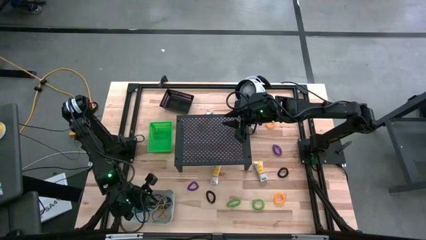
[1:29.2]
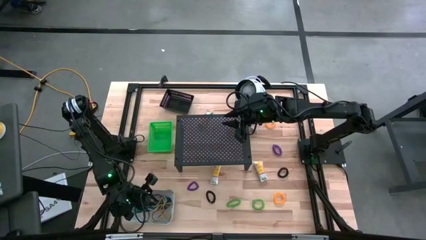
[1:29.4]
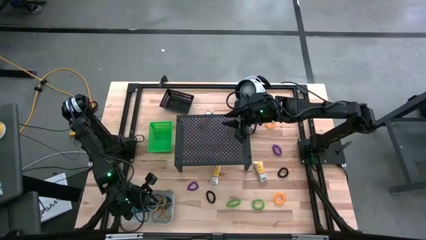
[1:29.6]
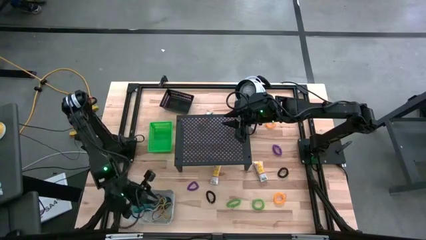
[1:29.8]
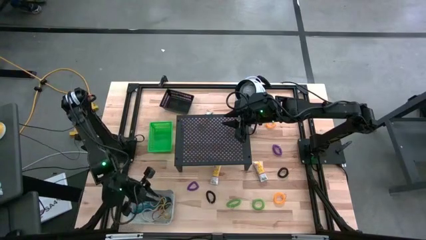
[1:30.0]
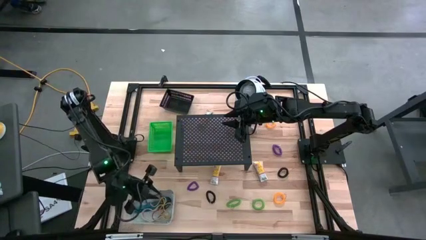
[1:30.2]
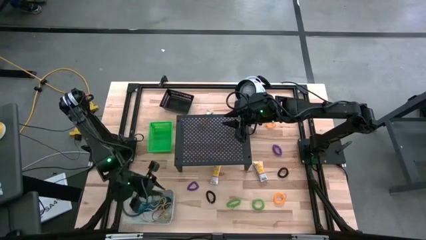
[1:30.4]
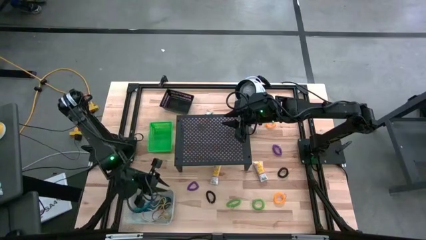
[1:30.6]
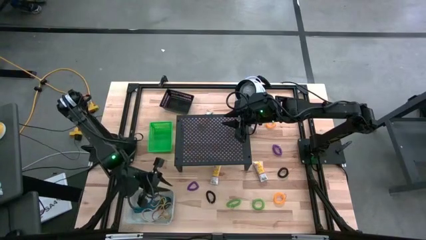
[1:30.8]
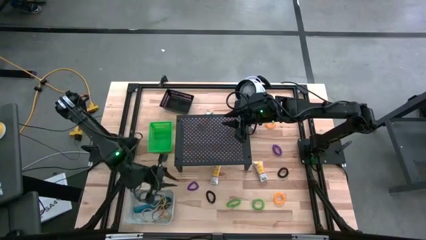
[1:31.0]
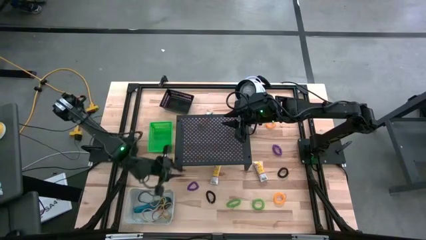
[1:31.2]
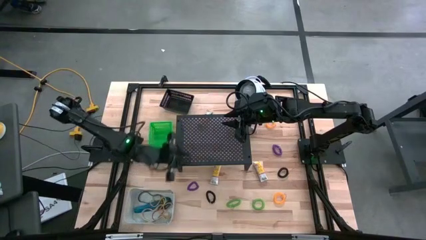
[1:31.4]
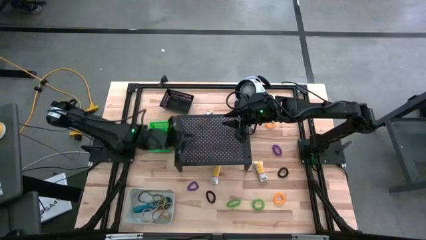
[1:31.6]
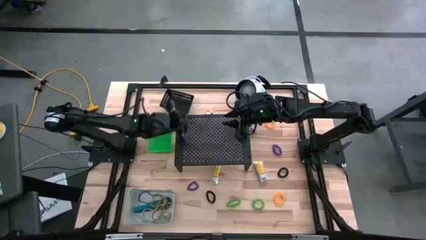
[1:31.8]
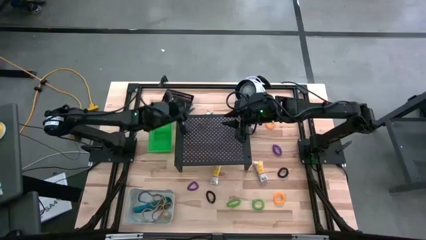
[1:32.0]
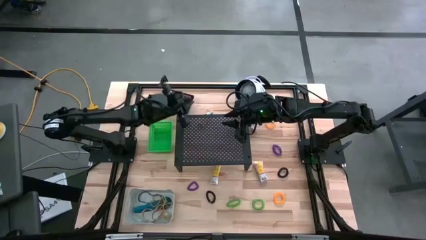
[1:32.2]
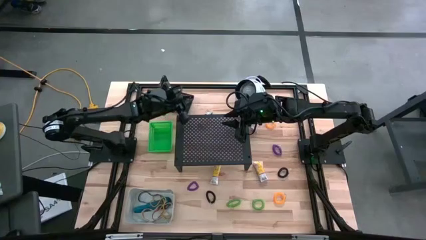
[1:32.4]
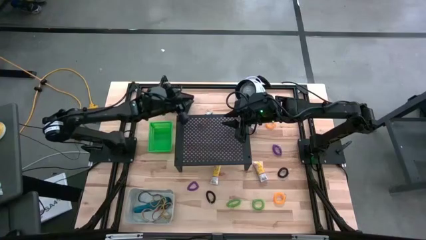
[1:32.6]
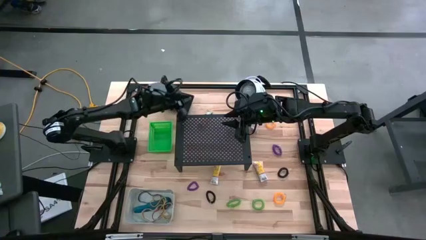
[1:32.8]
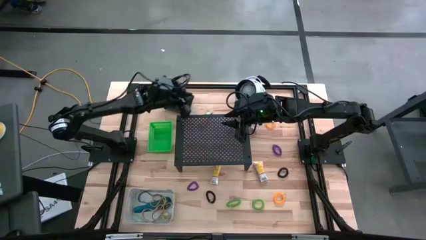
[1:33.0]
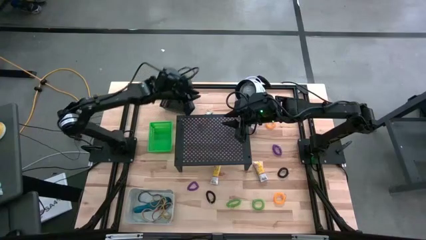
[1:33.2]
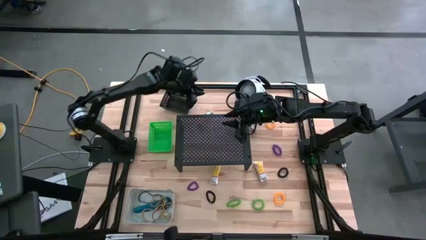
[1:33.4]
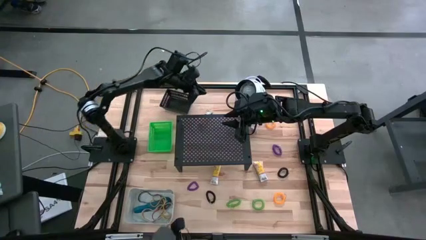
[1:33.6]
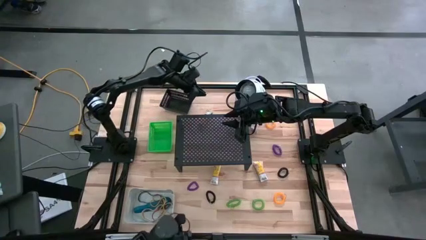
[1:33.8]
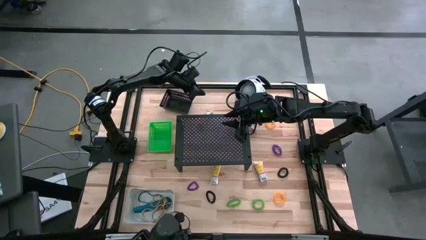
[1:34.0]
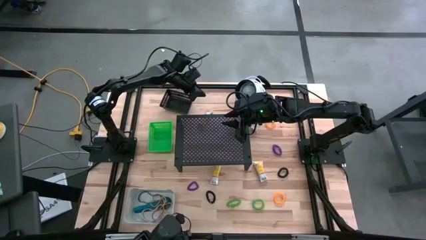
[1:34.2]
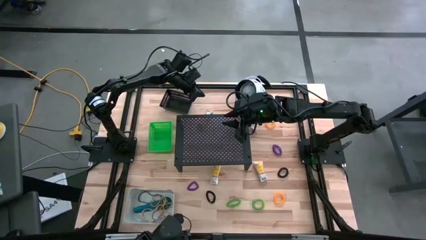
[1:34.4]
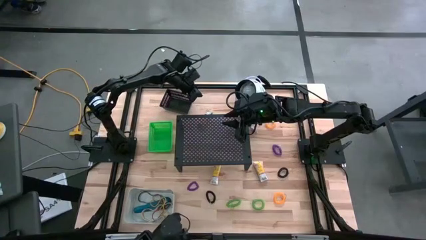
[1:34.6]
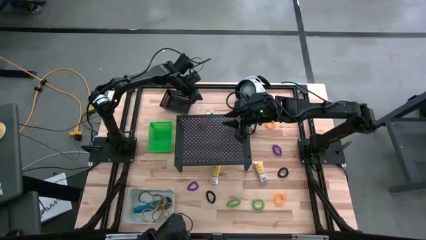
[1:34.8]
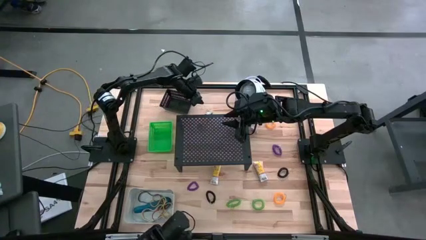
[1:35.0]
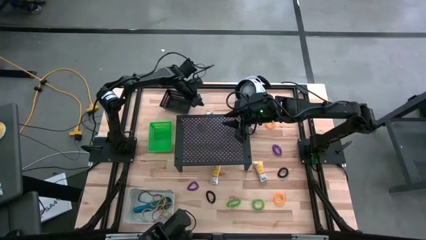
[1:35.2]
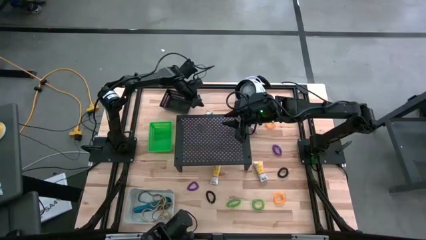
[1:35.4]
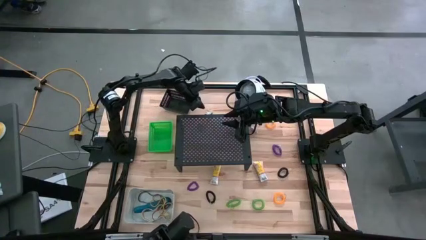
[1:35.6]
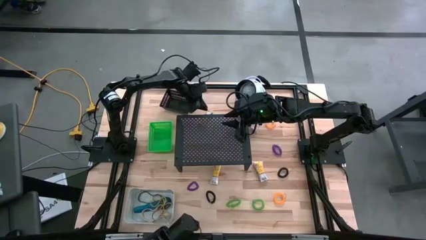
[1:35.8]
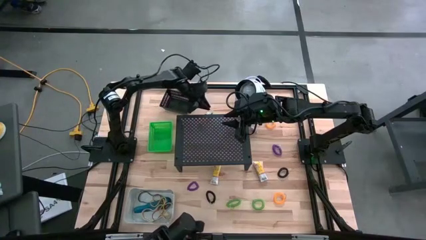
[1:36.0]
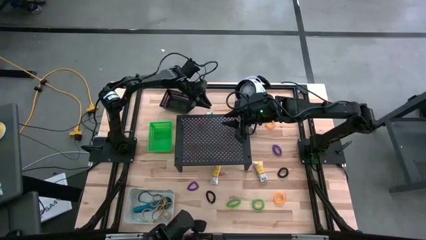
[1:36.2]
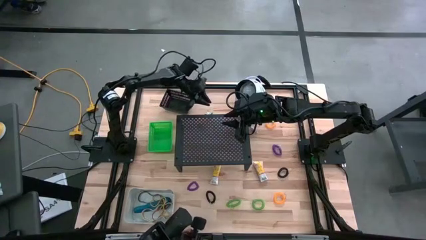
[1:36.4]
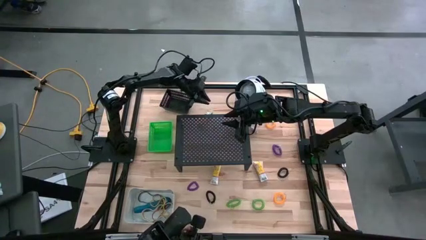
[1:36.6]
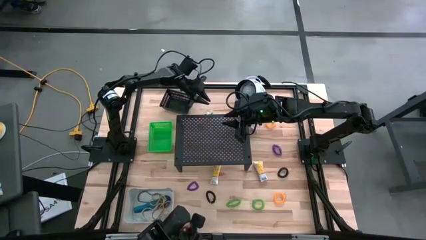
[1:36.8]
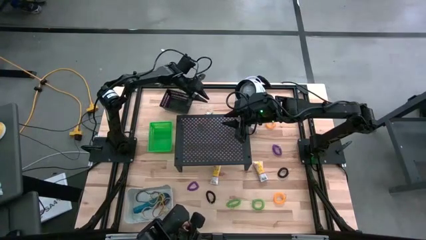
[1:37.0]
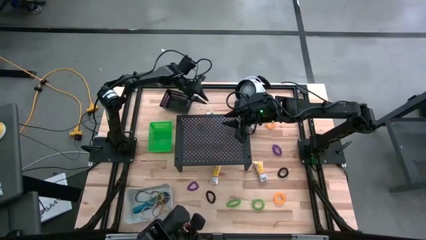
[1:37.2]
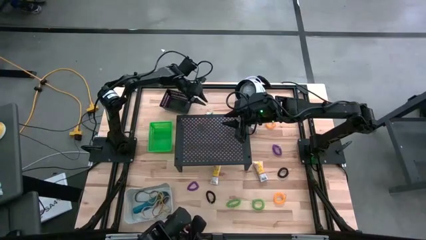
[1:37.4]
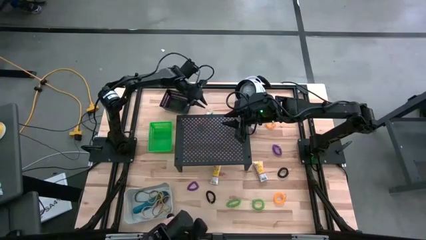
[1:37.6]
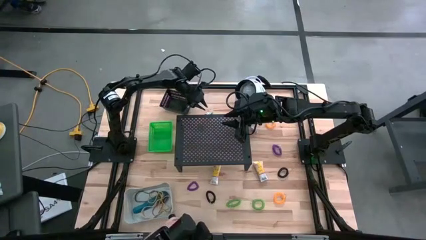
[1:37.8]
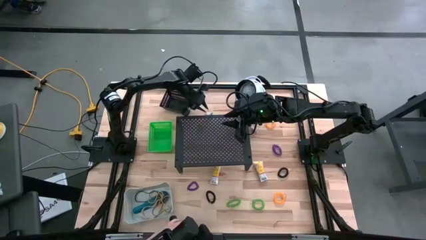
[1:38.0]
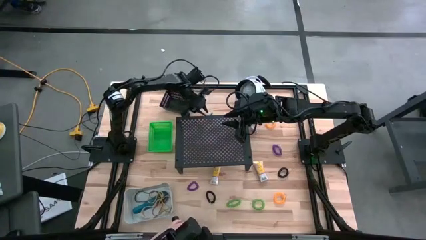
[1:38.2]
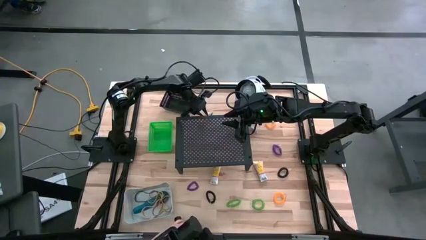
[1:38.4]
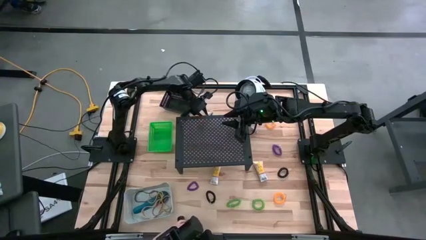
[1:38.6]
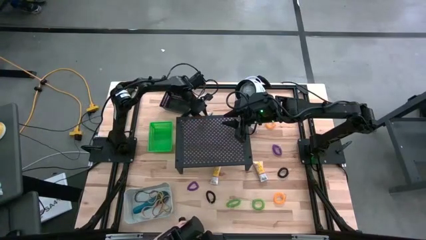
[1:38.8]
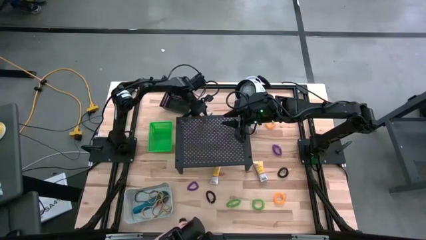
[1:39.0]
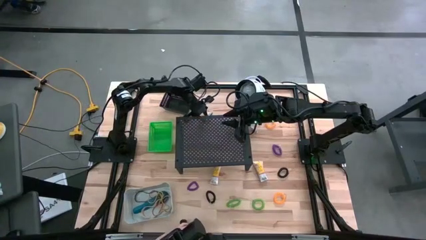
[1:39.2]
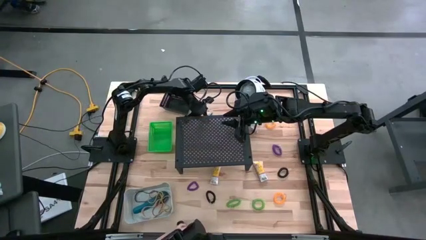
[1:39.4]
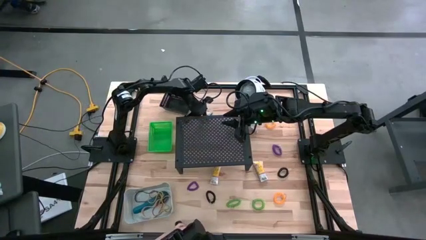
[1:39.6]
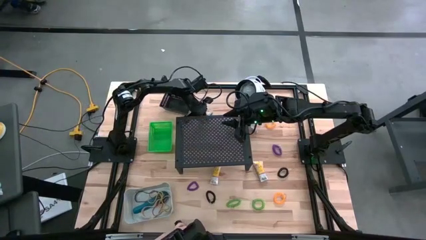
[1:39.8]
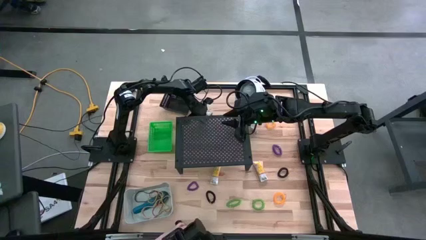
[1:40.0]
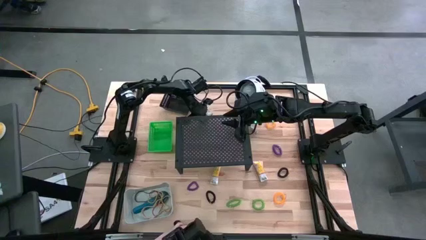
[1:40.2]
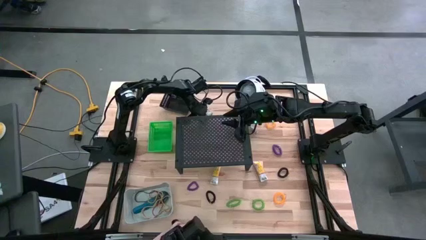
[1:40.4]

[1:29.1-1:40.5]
Task: Pick & Place Office Desk Supplies
Put the top crayon box into the black bin

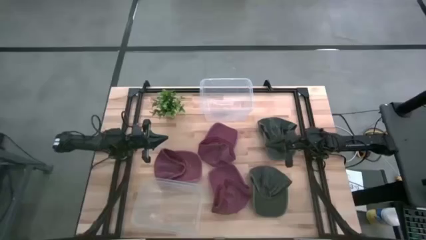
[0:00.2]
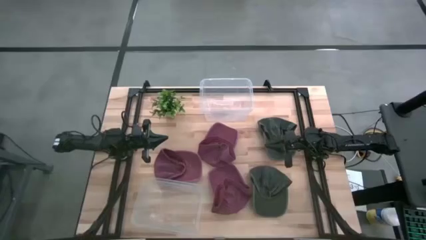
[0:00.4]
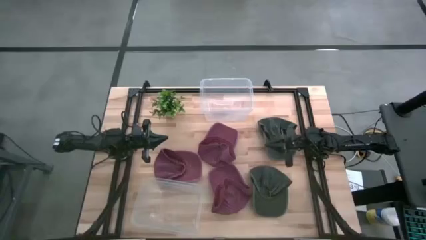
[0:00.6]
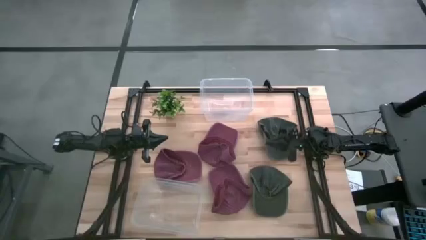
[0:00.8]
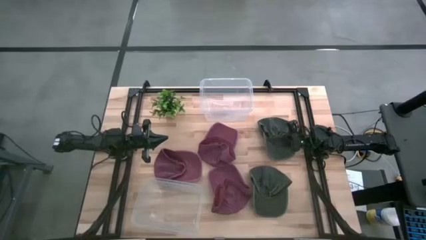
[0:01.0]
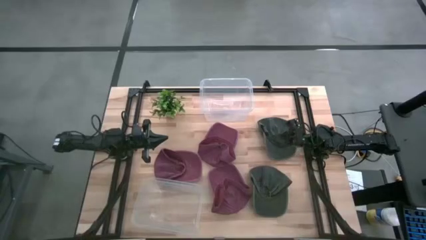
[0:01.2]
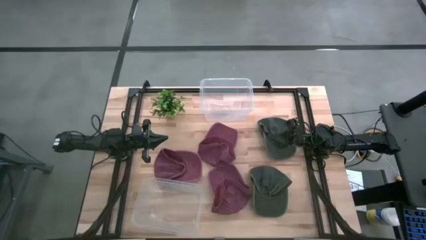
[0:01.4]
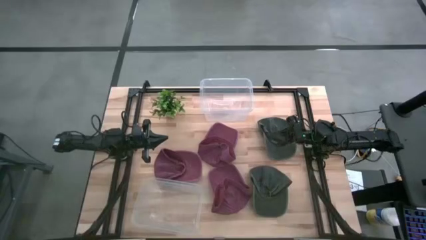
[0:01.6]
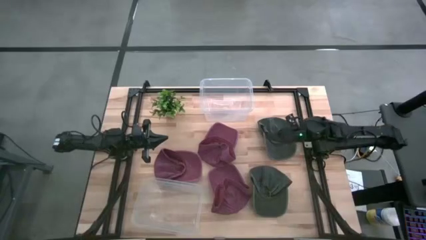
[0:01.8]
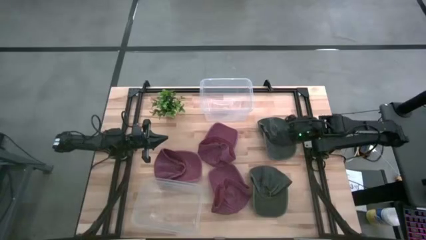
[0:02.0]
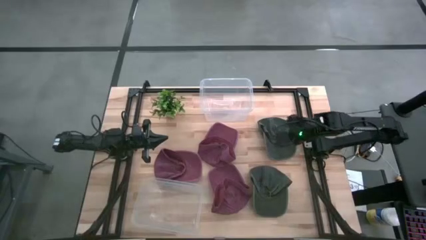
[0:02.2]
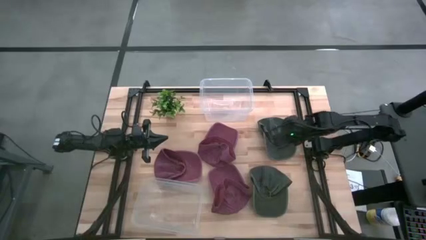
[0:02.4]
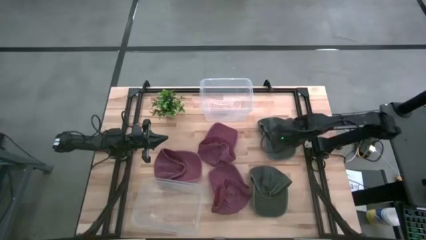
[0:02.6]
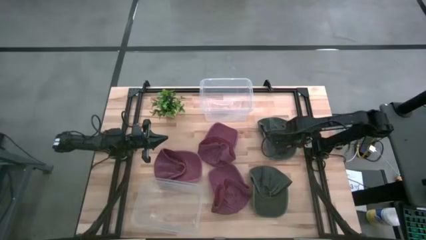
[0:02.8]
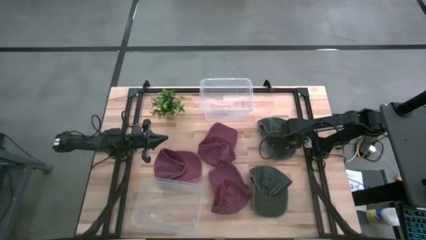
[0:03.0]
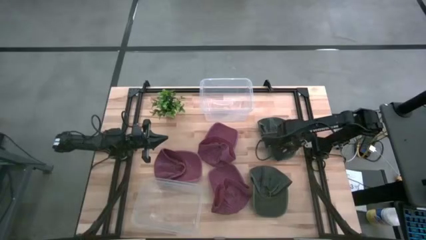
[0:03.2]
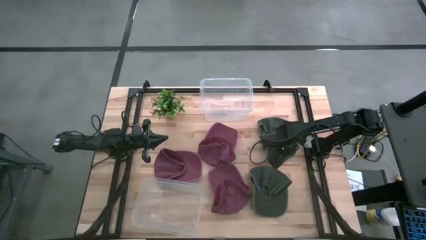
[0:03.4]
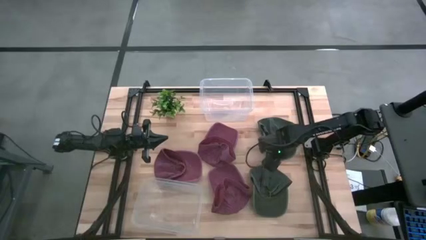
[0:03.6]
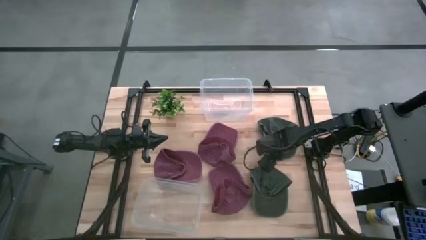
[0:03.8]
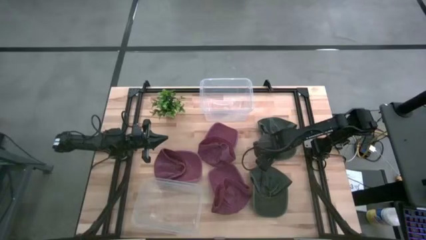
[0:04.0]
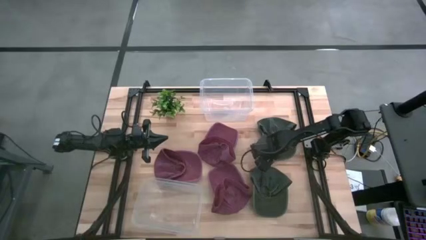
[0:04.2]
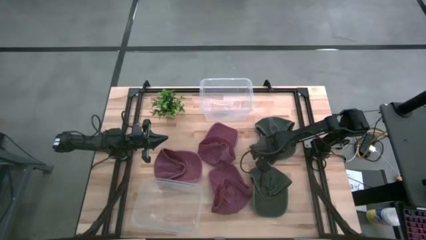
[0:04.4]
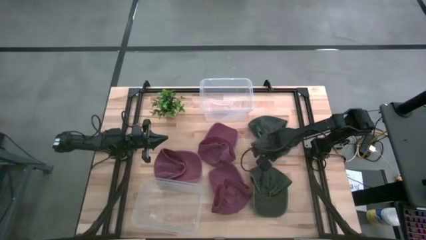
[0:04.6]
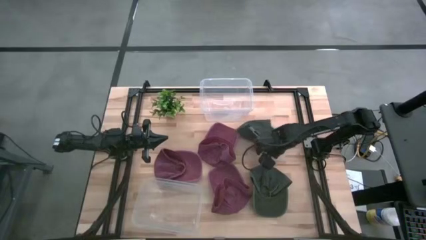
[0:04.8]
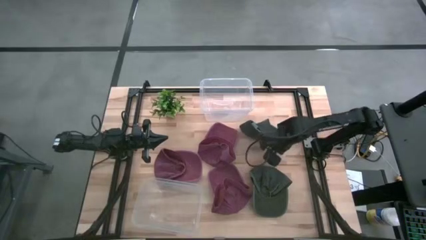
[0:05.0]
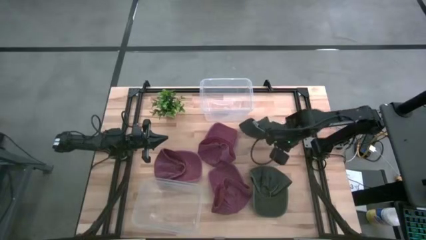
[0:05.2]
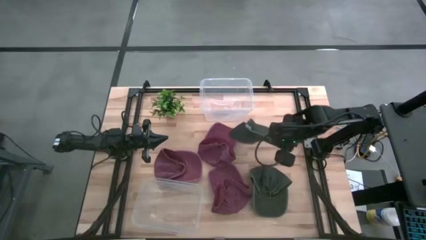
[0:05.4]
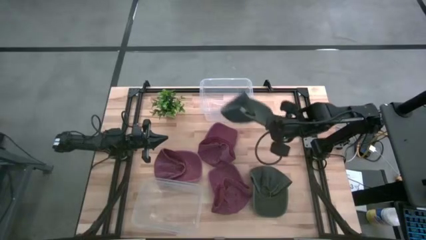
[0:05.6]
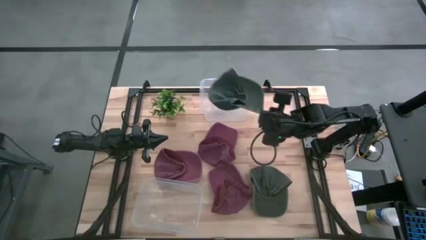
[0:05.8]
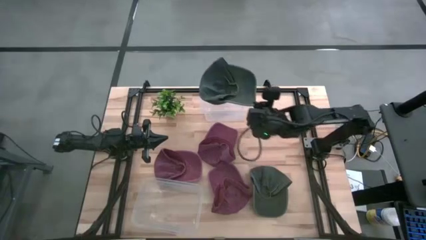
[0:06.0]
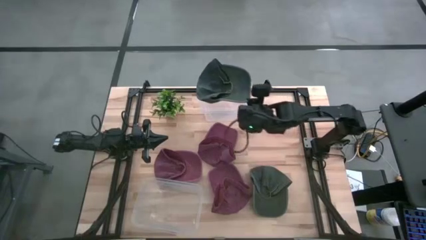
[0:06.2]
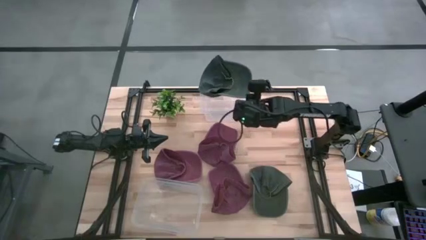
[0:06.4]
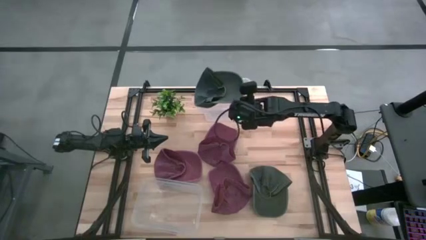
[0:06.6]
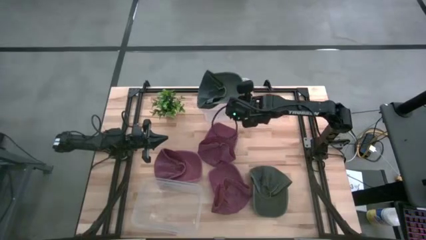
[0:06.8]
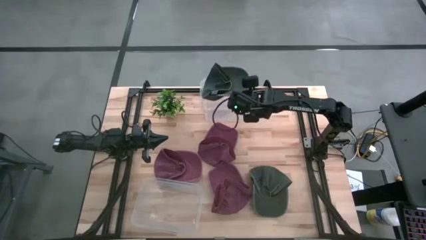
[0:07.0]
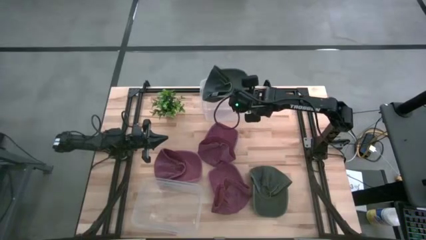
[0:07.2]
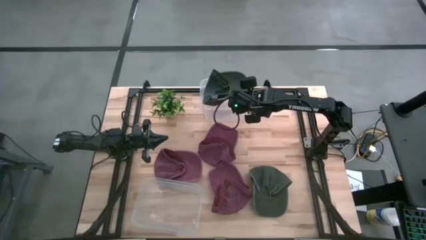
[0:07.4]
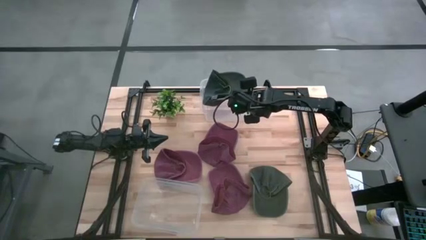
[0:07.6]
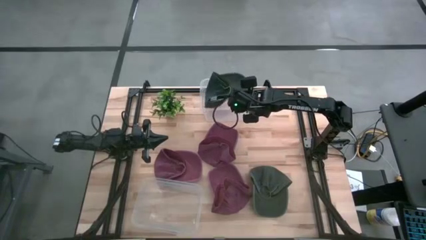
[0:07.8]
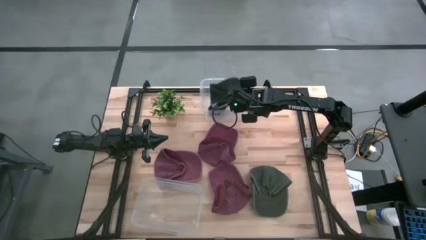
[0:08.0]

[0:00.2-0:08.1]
Task: Pick & Place hat
Put the top green cap into the top transparent bin
